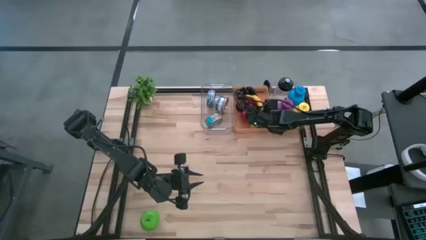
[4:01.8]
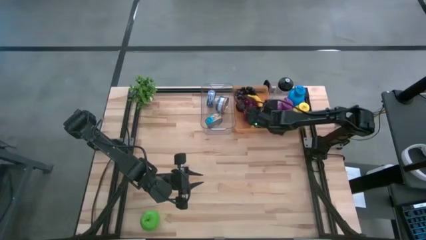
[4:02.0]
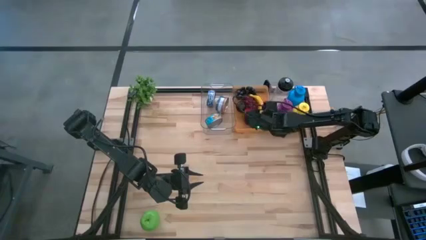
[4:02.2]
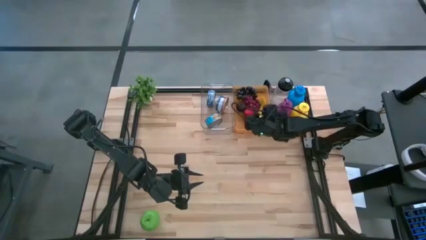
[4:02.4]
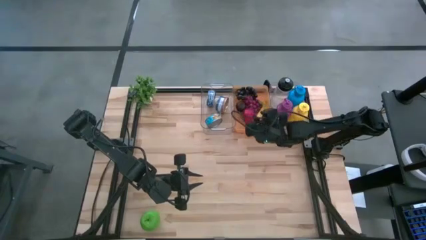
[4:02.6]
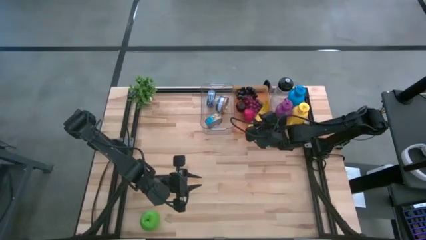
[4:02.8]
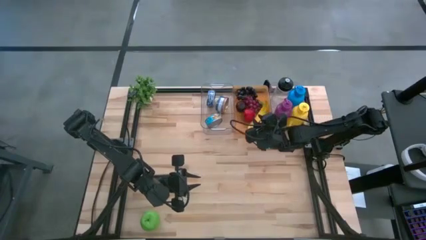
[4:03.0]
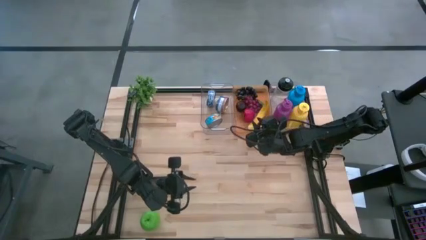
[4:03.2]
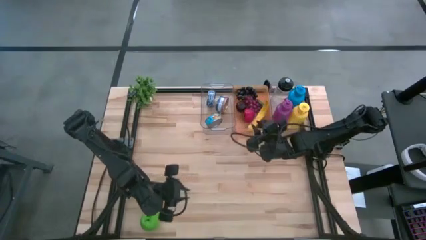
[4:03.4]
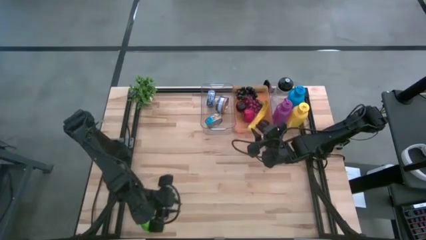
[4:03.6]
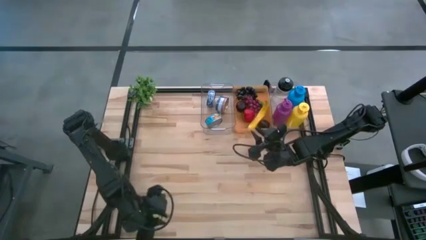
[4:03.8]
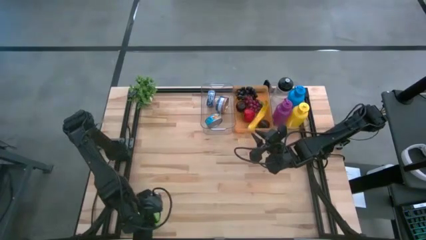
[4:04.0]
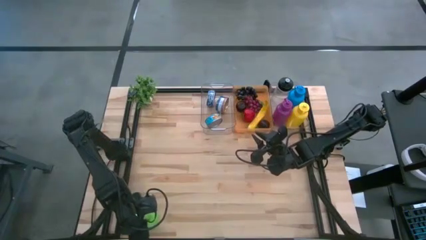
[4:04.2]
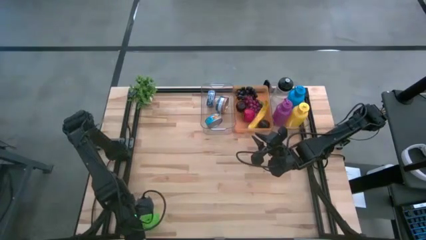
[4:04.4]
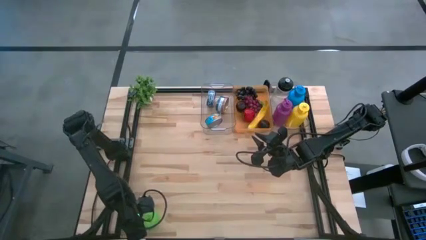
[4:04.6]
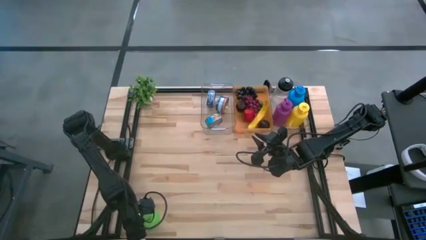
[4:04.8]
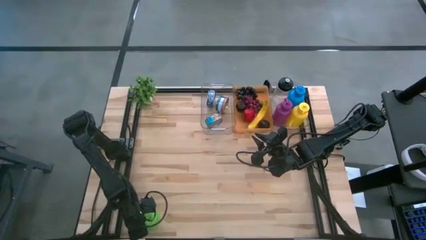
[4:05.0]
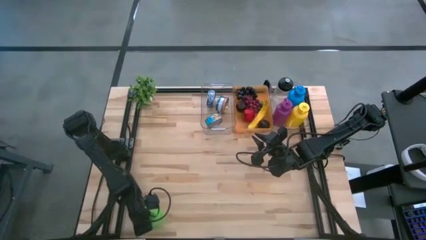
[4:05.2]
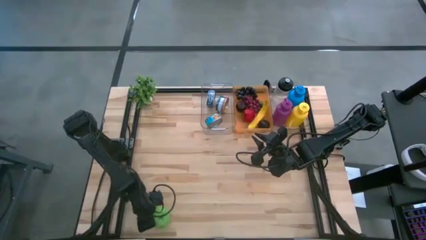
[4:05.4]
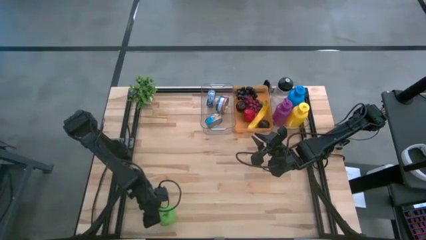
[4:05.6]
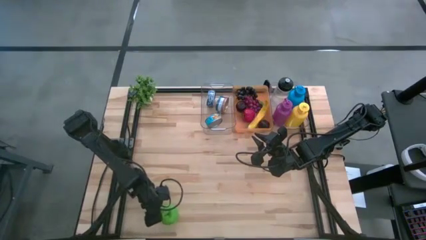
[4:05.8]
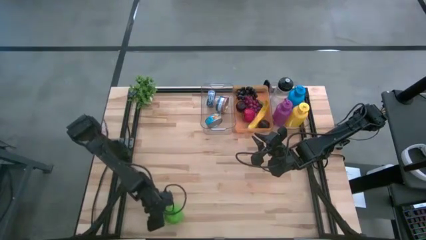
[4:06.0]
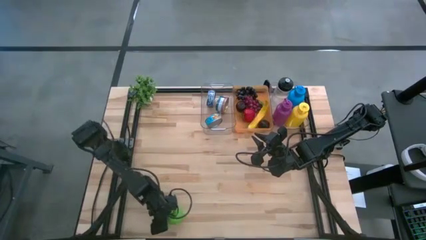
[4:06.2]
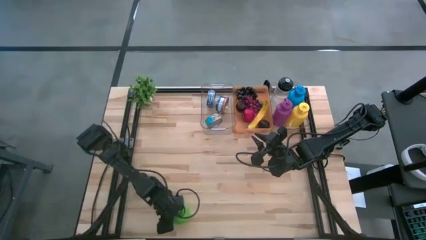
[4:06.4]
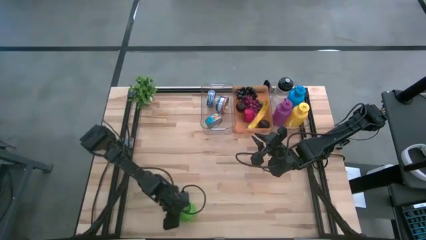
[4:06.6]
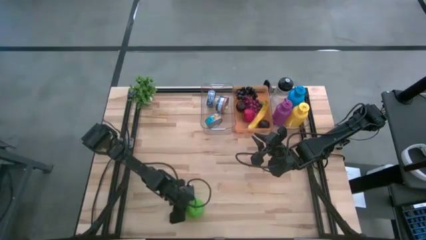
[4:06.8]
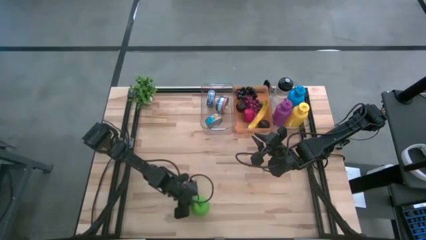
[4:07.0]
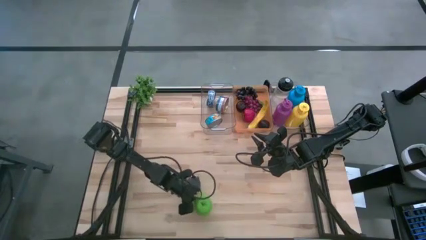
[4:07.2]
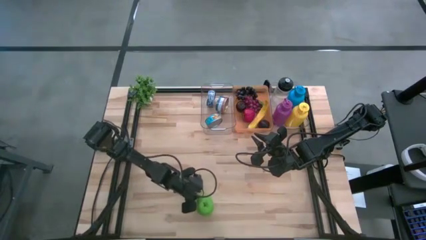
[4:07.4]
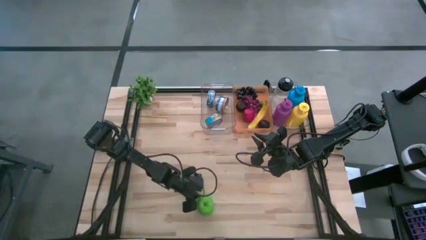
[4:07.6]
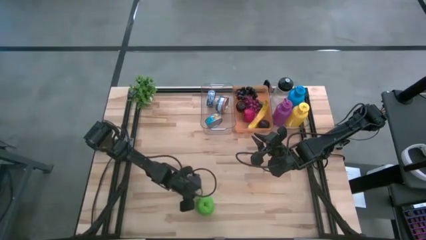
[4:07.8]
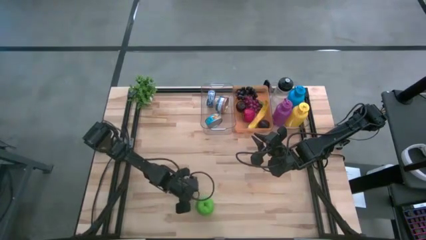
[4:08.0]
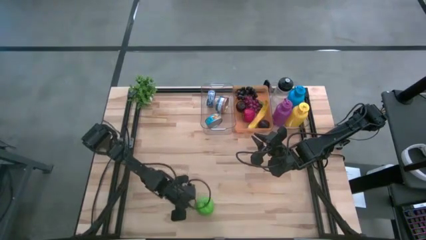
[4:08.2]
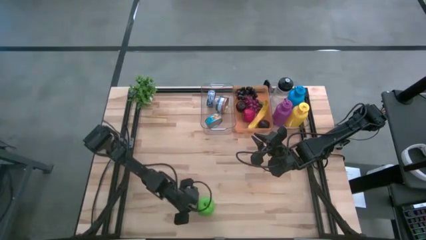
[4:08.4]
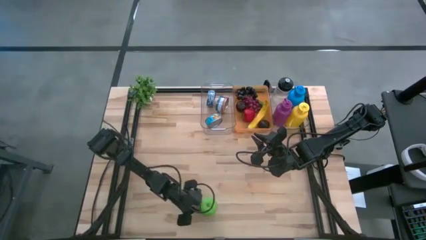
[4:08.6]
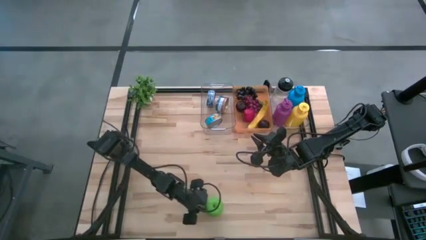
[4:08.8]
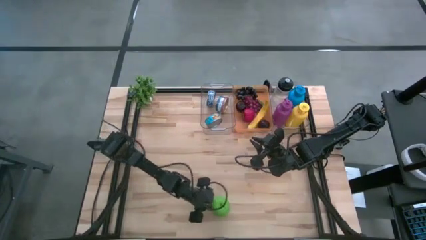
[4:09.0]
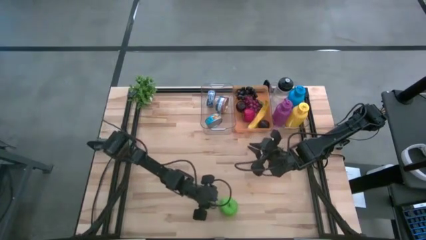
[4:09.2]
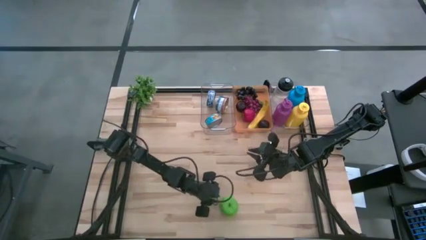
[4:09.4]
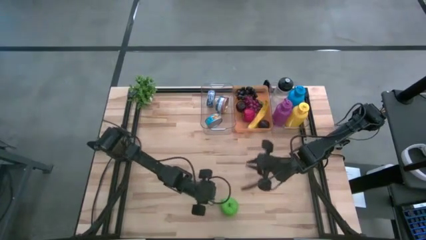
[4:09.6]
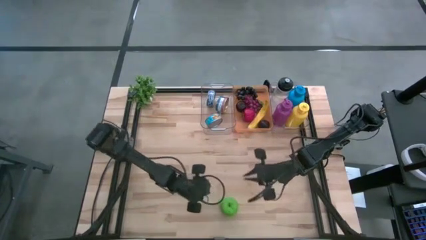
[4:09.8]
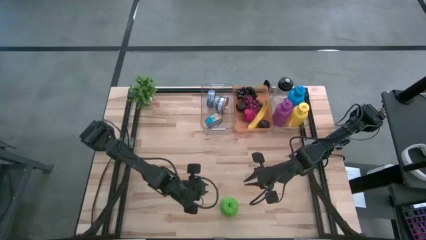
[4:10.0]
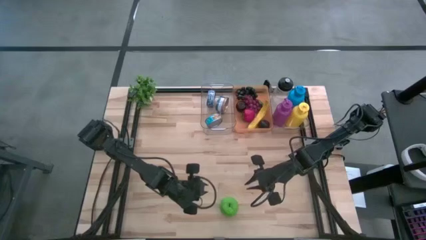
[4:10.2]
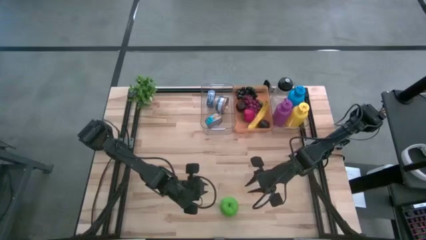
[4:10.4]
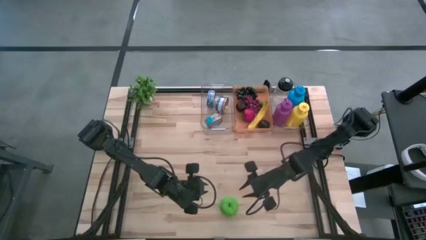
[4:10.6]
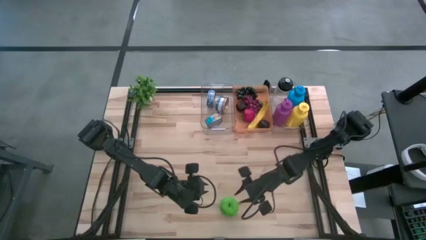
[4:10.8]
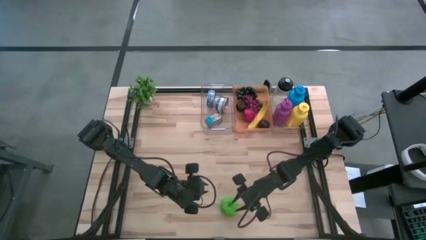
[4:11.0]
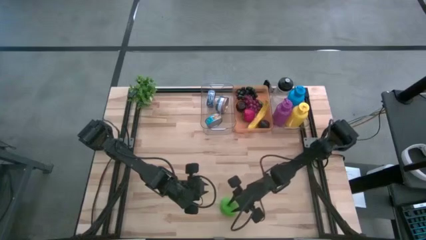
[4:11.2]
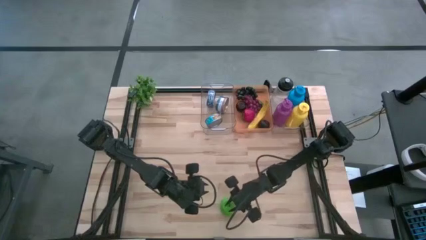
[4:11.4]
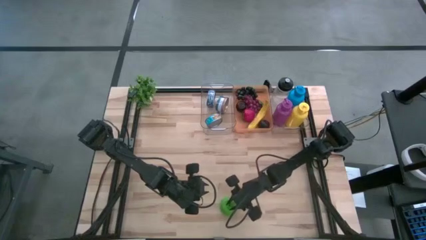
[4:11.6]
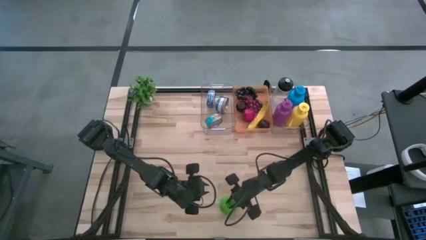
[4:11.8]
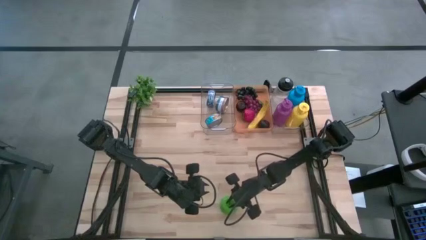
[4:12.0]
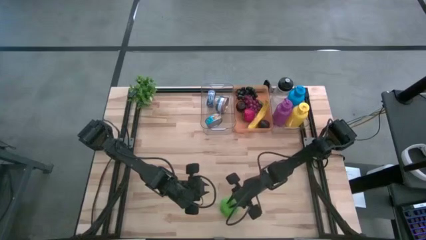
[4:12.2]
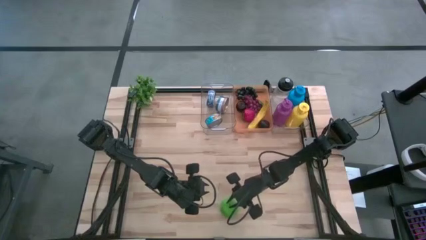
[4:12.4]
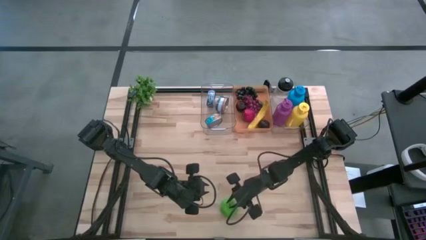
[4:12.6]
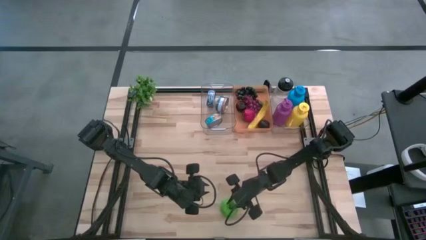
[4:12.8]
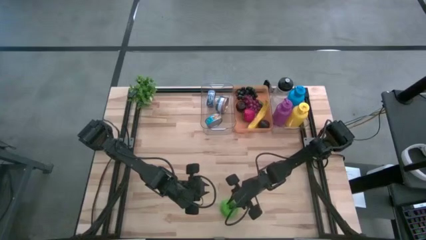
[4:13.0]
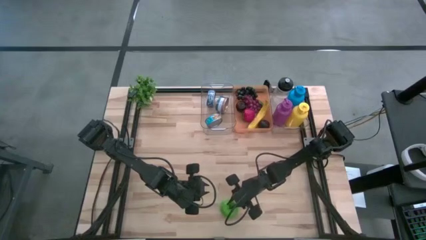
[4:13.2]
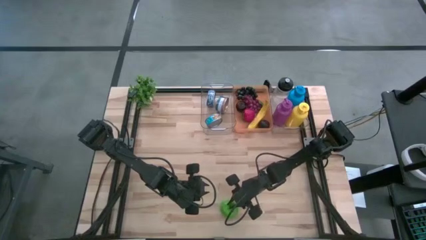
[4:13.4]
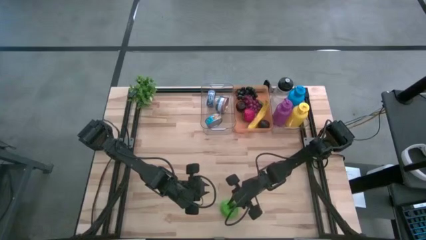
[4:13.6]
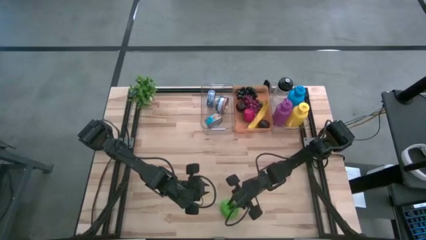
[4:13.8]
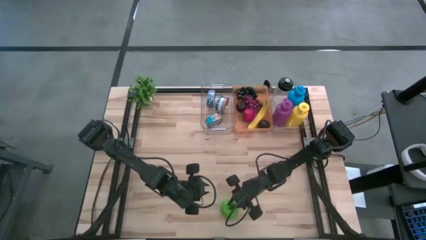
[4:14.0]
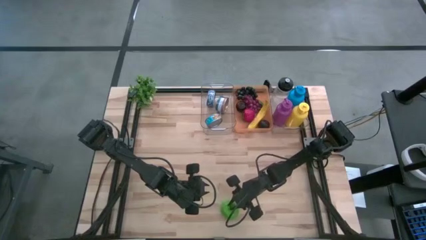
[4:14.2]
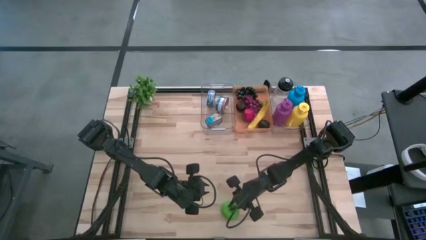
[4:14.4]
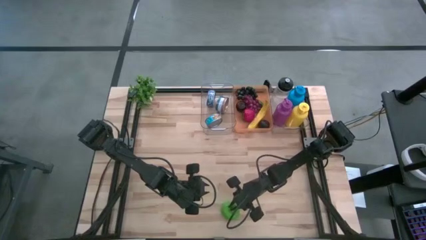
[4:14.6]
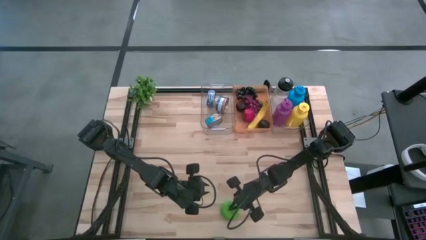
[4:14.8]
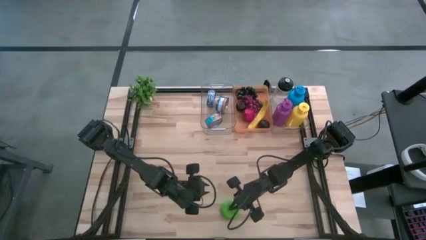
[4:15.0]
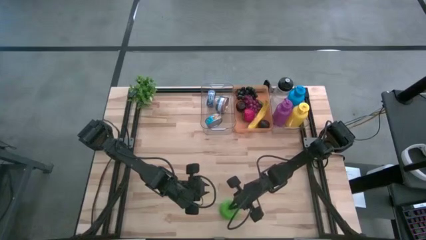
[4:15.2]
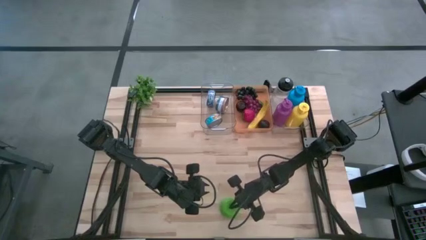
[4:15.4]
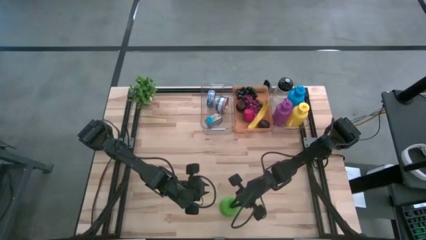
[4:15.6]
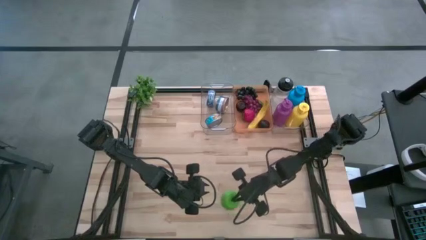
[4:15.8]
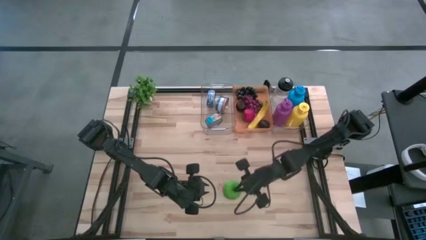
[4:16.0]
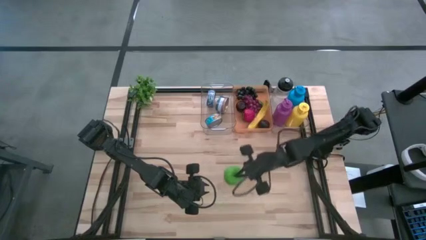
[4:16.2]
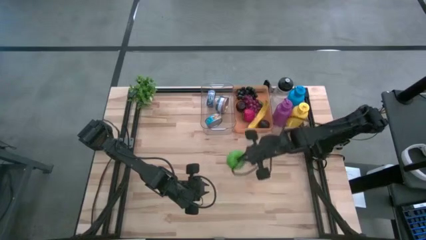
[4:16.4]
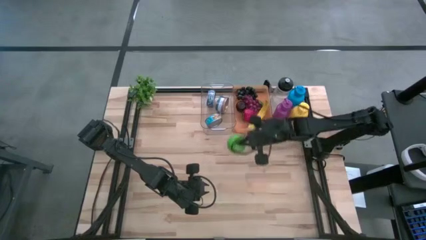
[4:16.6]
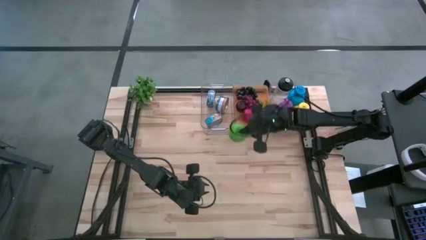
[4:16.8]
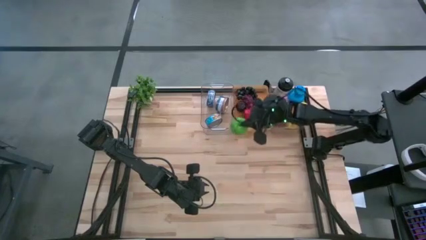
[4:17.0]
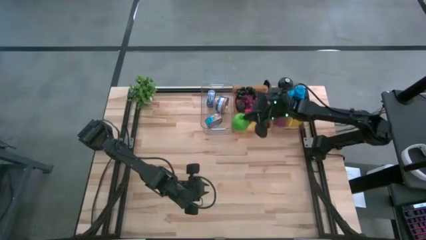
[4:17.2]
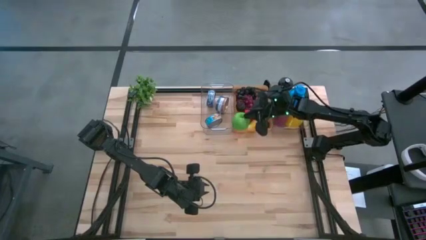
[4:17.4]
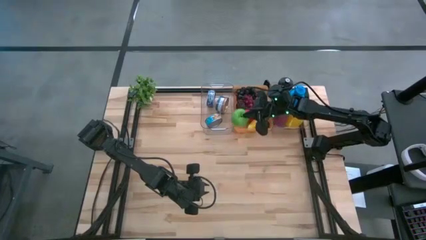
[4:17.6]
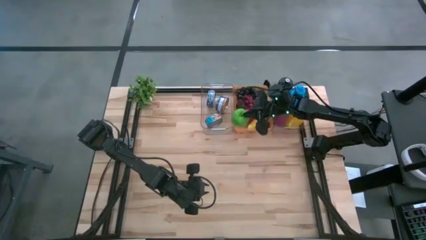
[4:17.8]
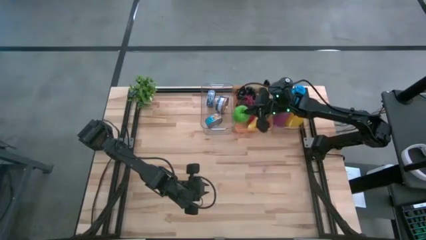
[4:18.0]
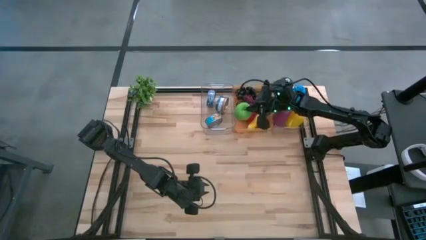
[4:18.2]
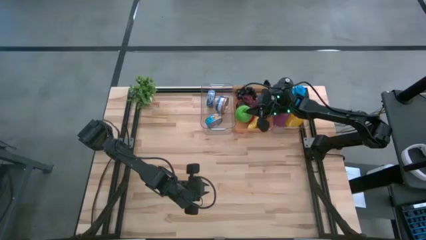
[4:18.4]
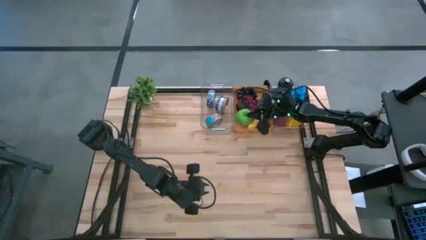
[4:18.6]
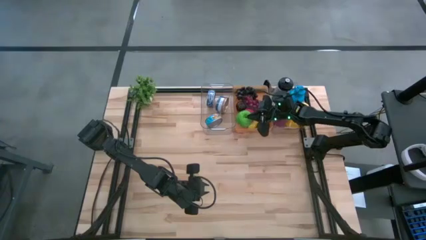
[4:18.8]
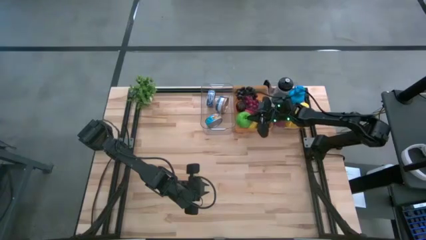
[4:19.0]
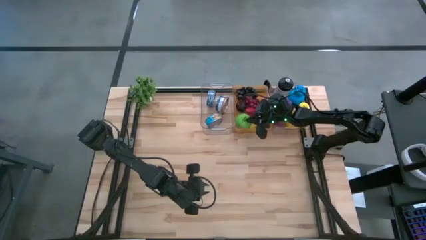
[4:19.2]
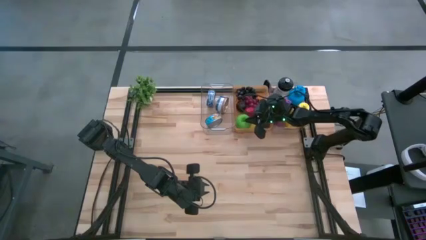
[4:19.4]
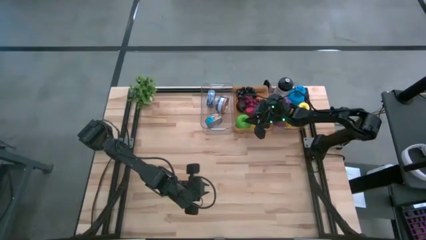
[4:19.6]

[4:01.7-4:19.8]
Task: Pick & Place Food Item
Put the green apple into the orange bin
